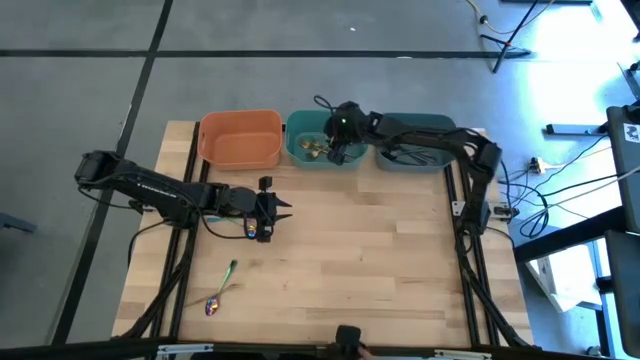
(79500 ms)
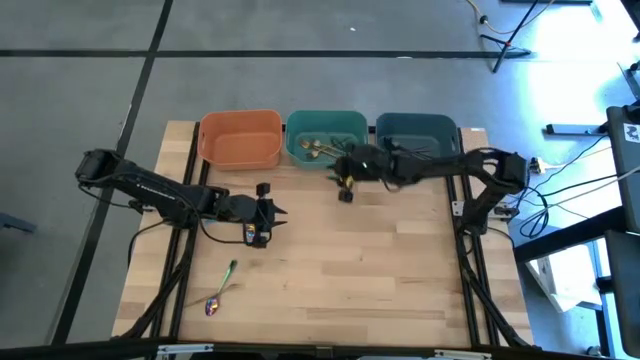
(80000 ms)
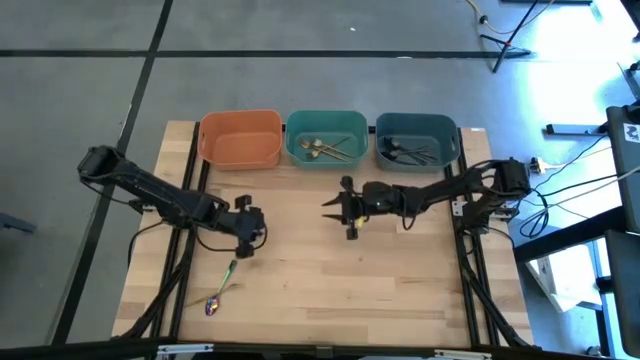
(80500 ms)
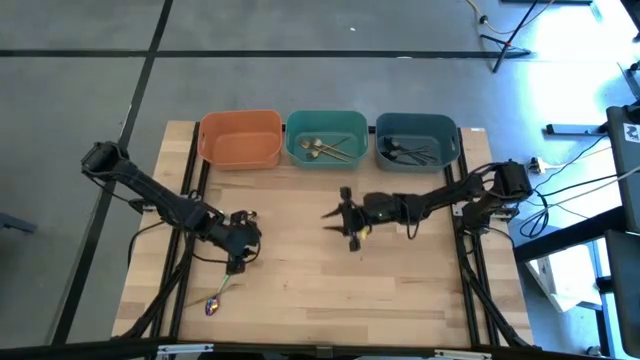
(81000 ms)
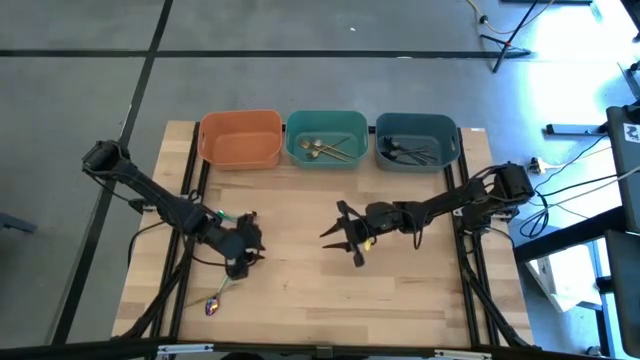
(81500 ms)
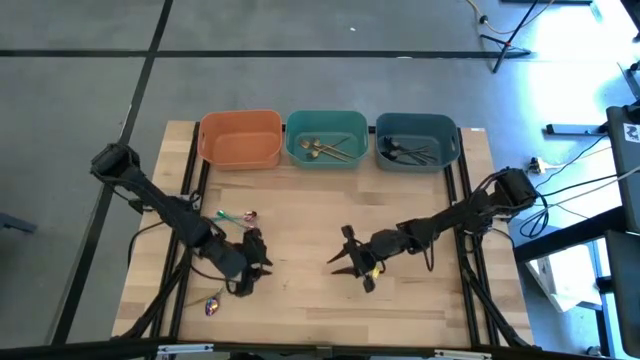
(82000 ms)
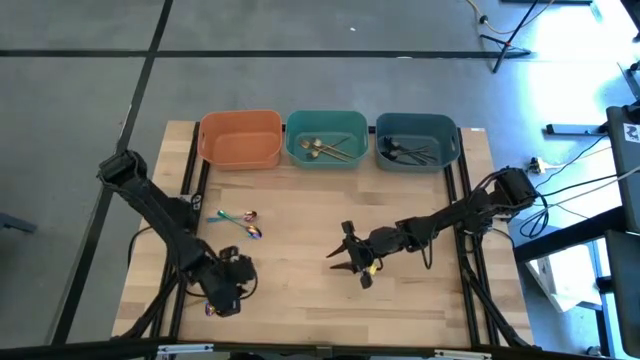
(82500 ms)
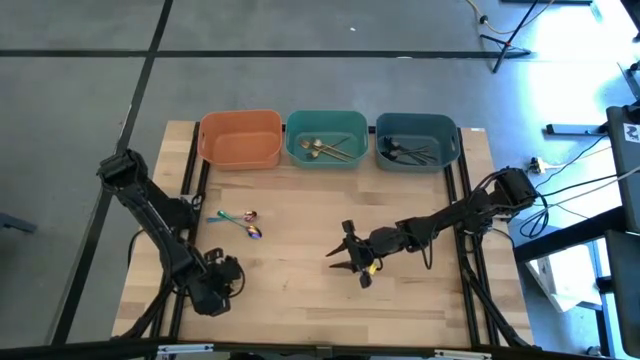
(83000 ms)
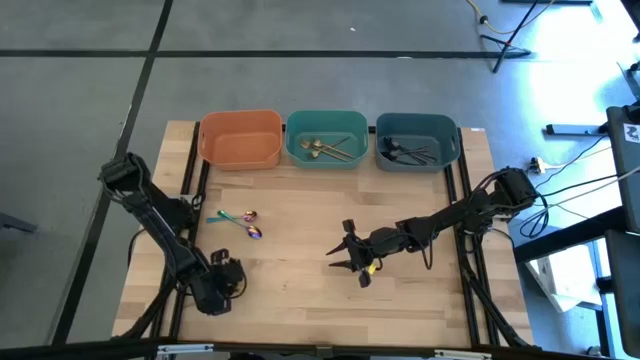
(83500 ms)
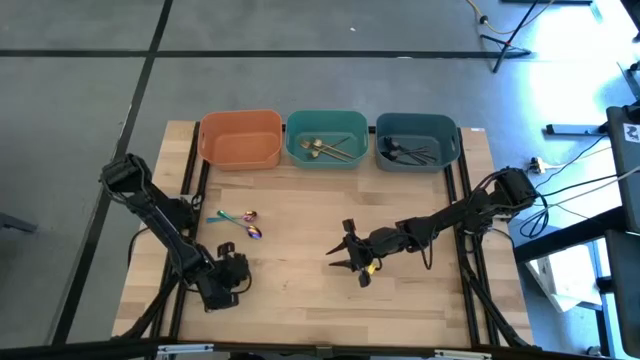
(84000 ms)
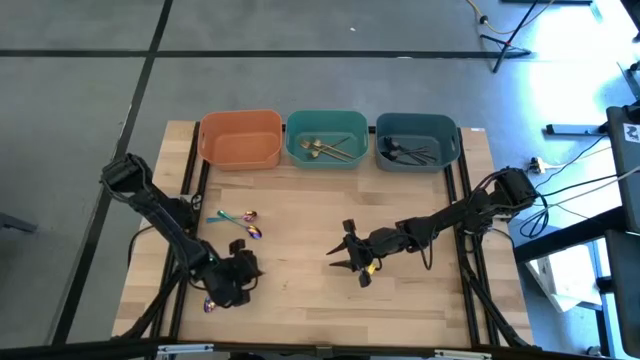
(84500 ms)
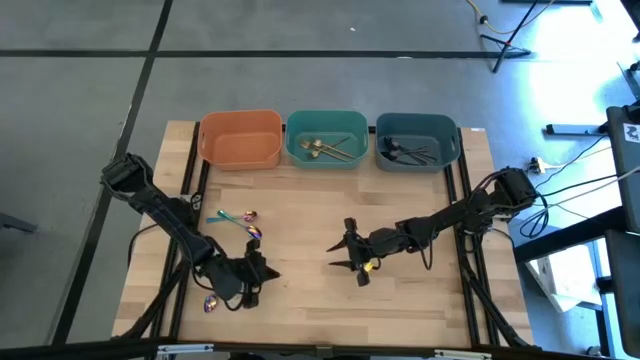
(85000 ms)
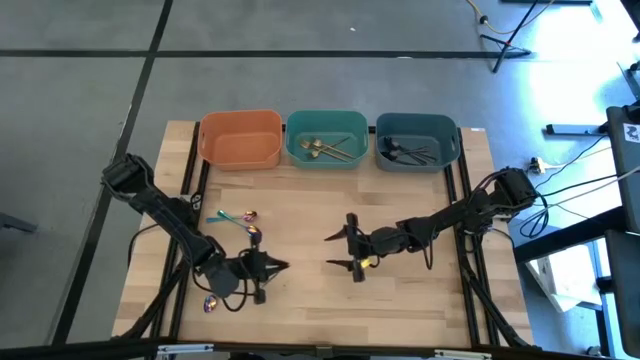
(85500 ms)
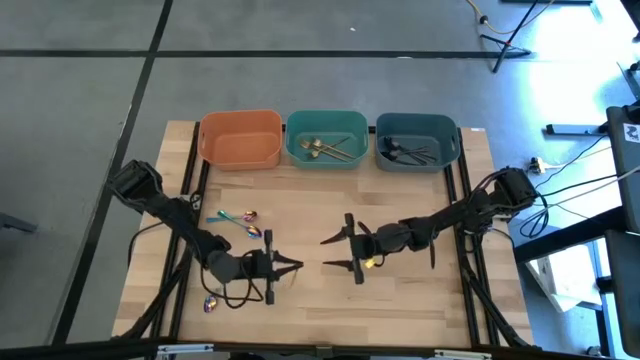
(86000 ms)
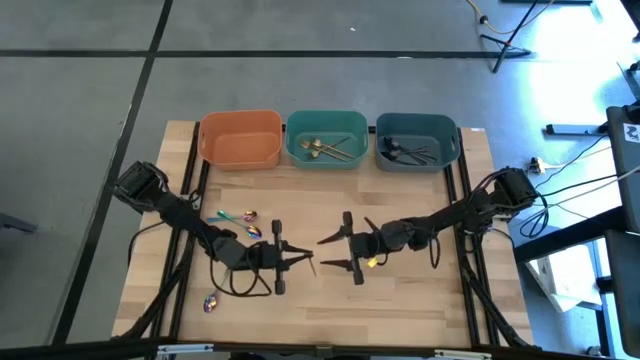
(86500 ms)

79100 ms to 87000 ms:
Task: Sort silverware by color (type)
Put the gold fork into the green bin

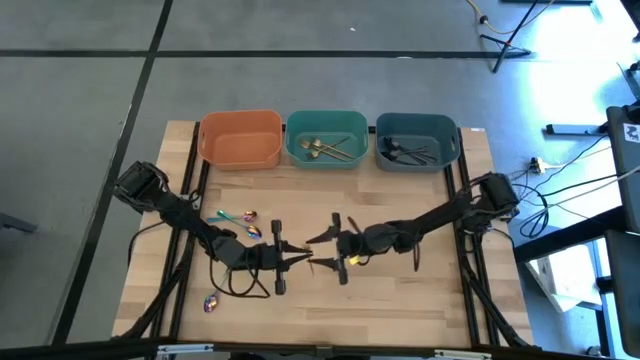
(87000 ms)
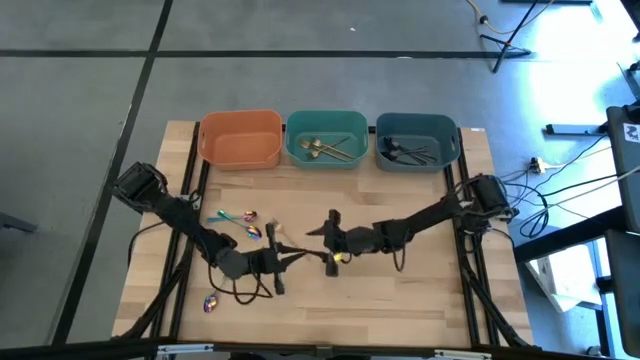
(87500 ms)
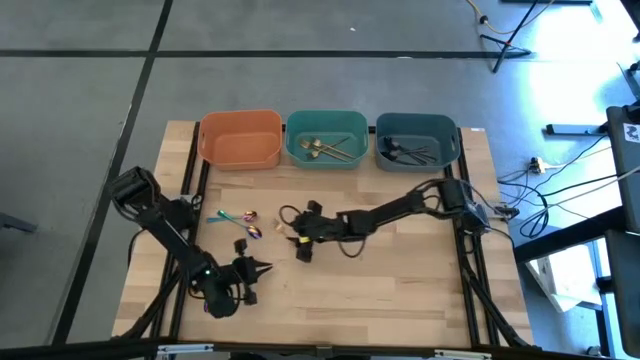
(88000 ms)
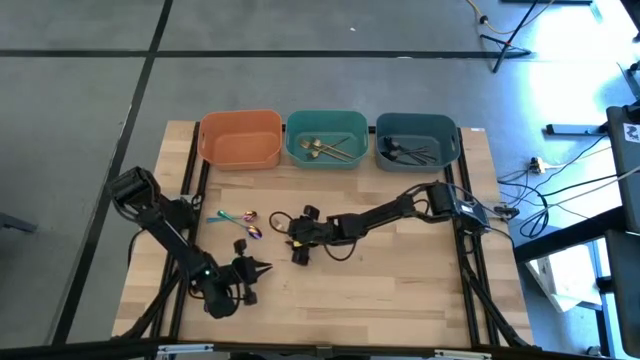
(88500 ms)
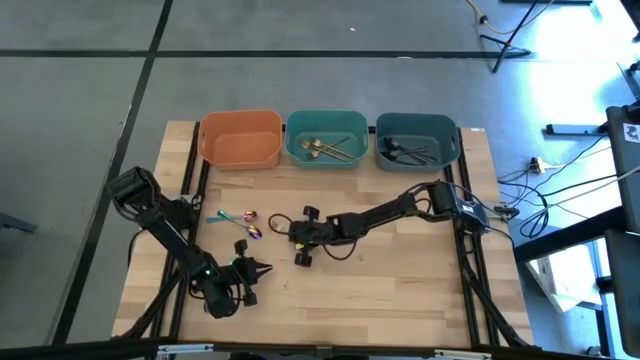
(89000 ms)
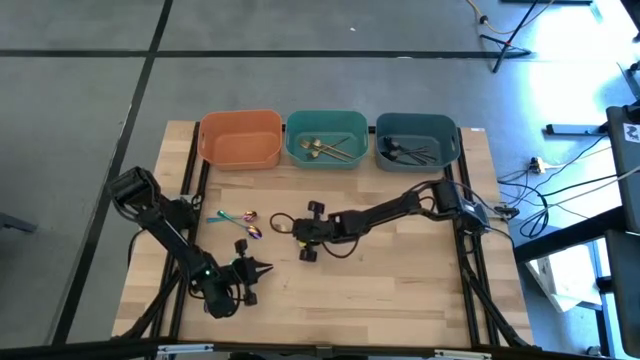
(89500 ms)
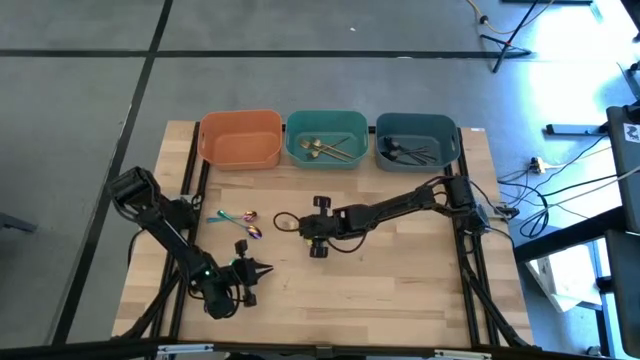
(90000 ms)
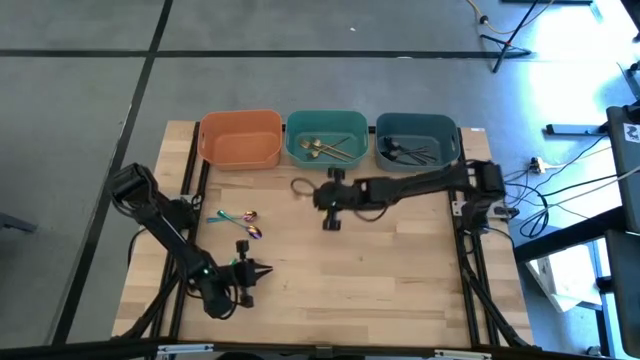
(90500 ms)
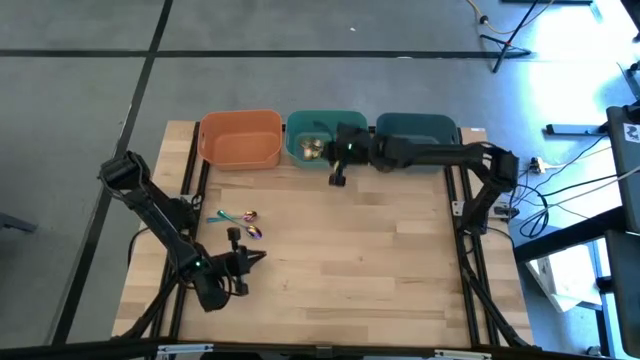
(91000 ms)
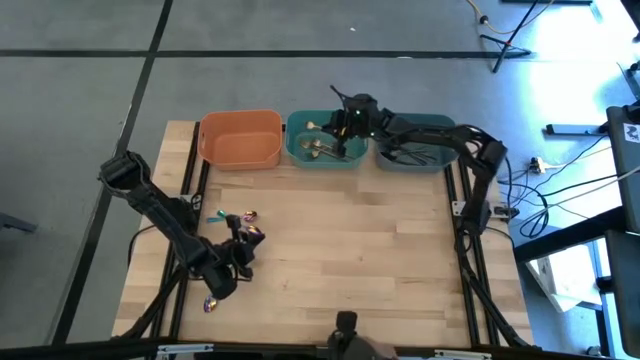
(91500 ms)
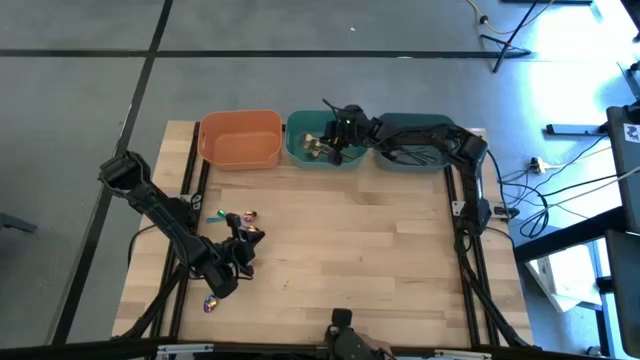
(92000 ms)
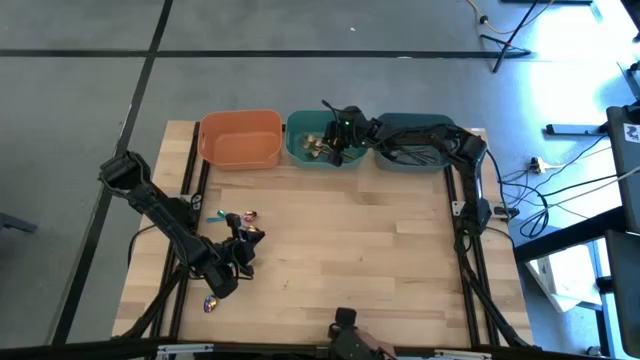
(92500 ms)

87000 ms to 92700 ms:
Put the gold fork into the green bin

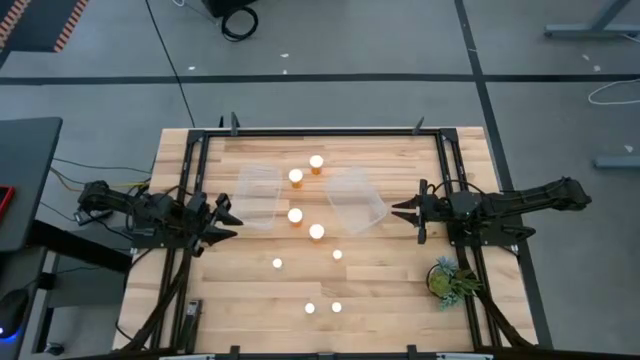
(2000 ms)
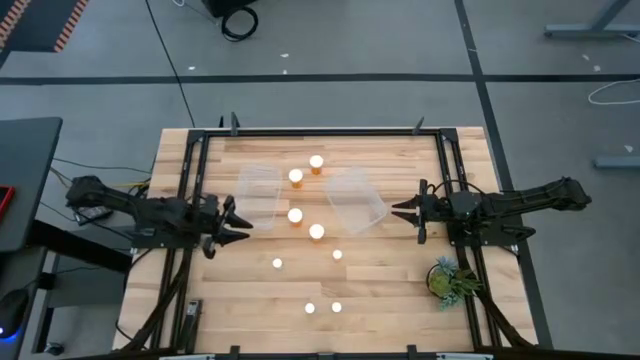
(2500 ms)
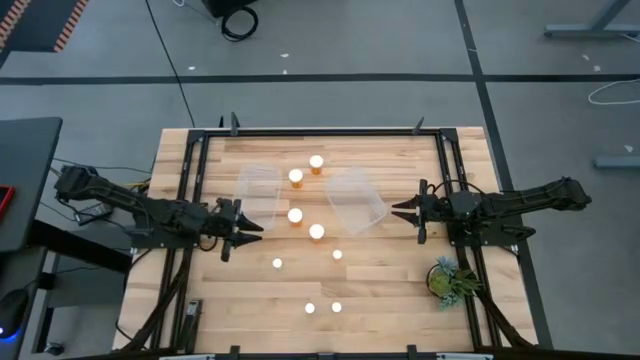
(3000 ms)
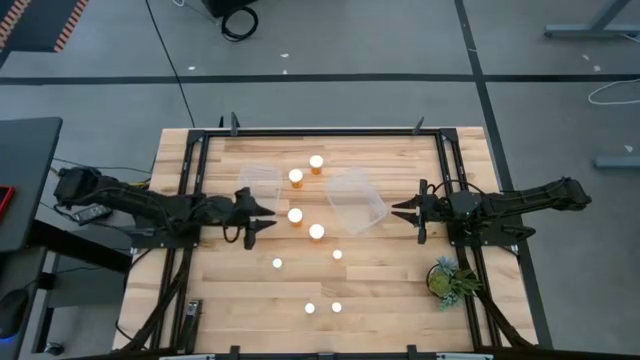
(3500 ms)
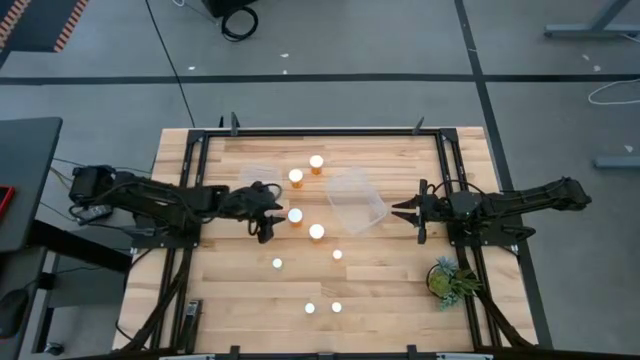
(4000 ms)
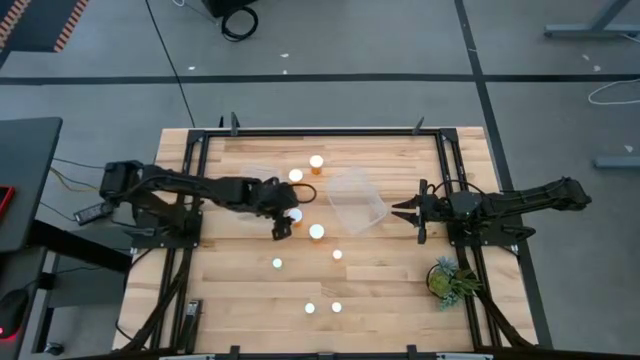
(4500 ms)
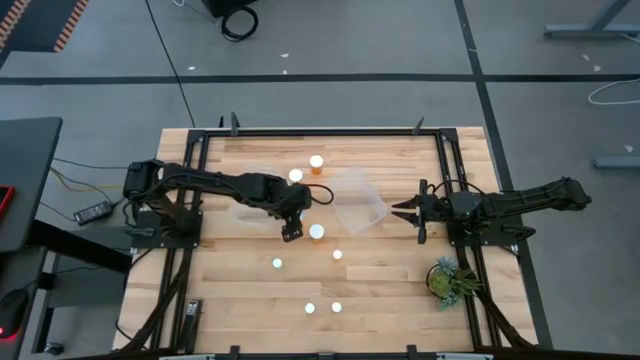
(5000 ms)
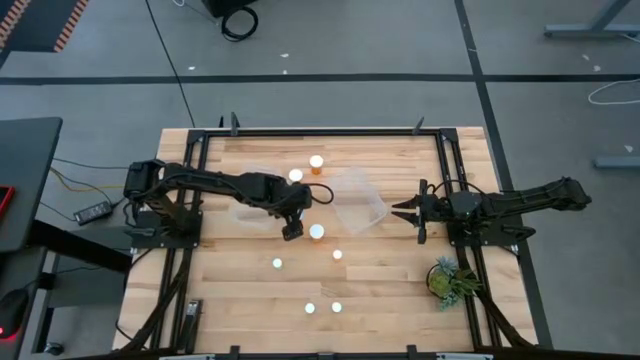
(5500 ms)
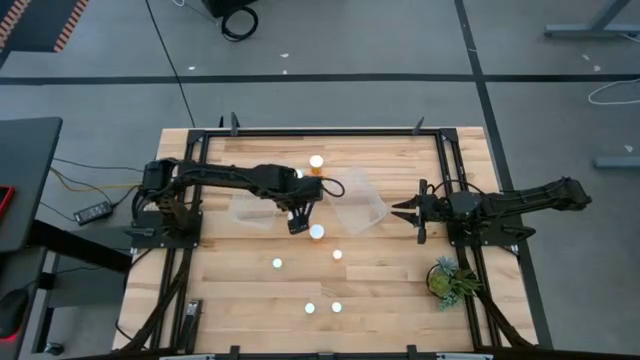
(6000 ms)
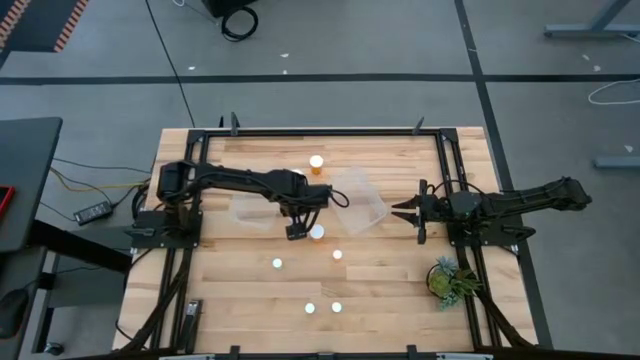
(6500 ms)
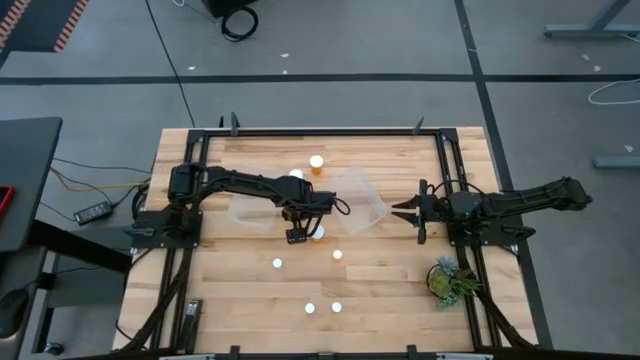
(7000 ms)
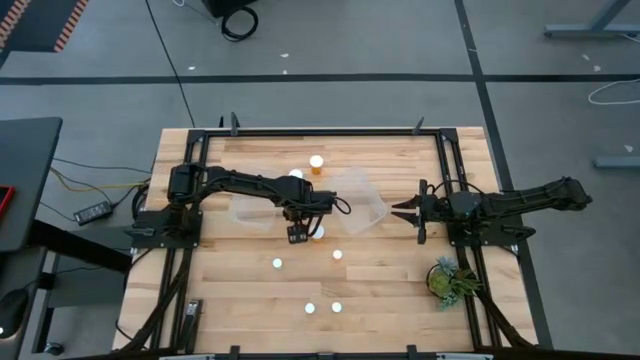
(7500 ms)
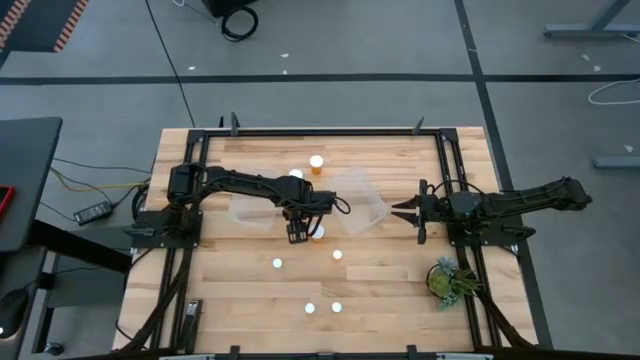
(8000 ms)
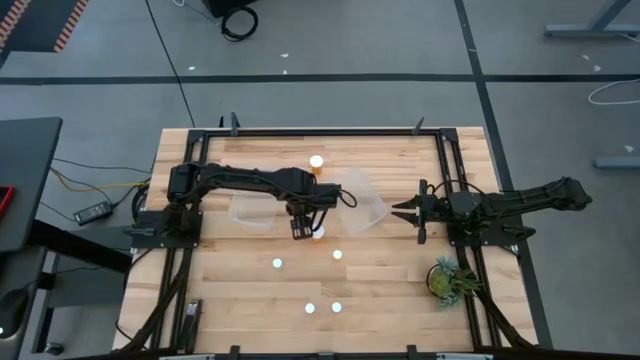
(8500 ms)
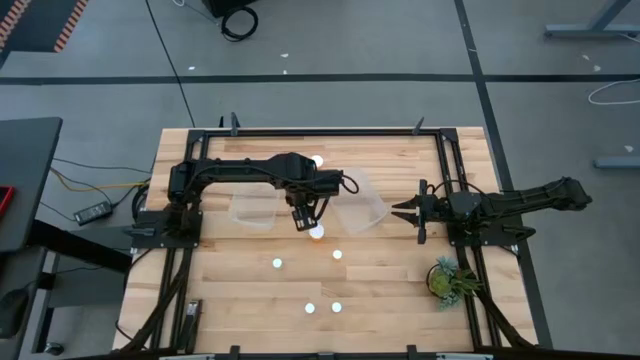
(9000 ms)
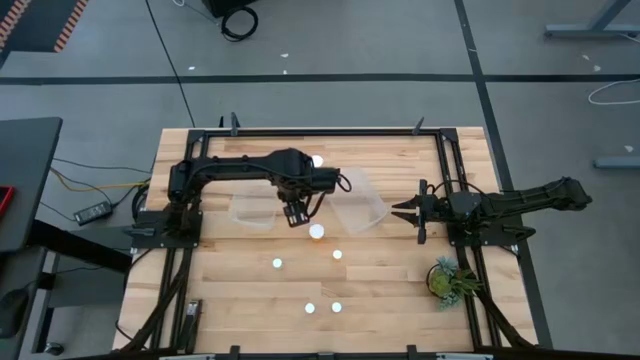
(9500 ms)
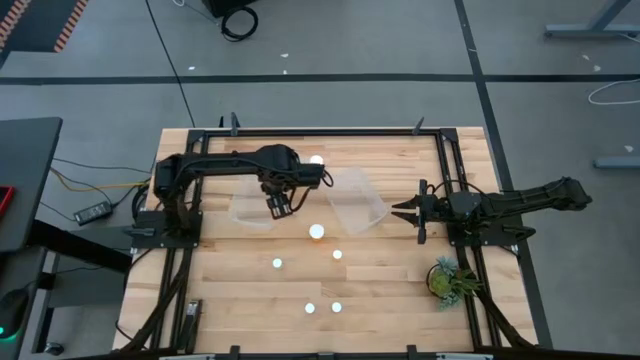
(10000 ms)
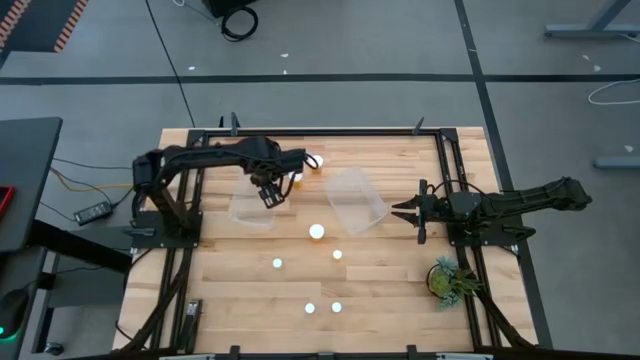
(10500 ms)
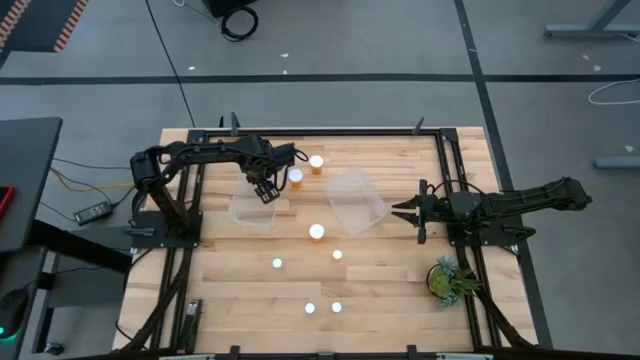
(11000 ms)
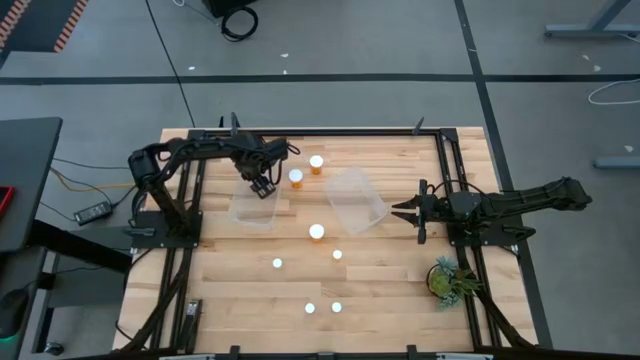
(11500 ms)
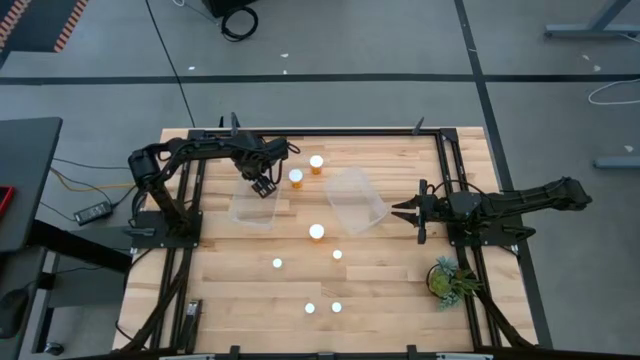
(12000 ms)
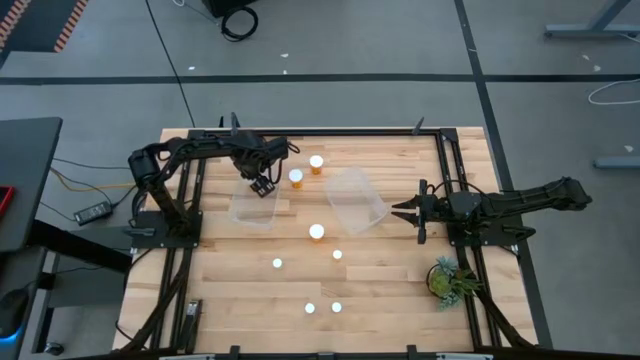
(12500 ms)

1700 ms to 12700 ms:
Task: Pick and place medicine bottles into bin by pill shape (circle, oval)
Put the large orange pill bottle into the left transparent bin
